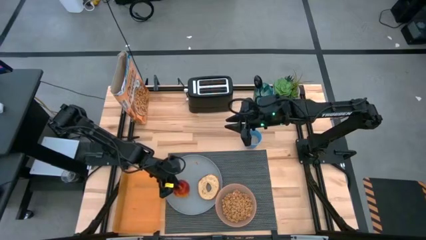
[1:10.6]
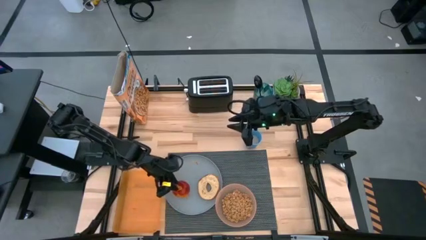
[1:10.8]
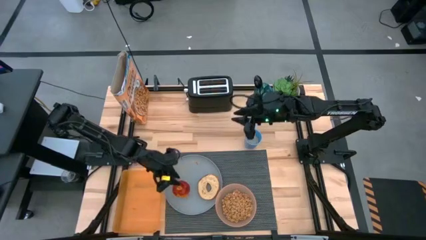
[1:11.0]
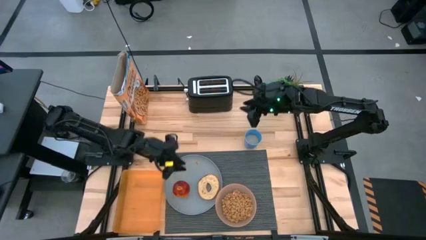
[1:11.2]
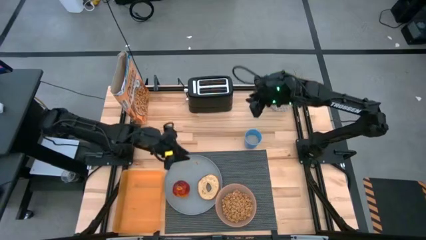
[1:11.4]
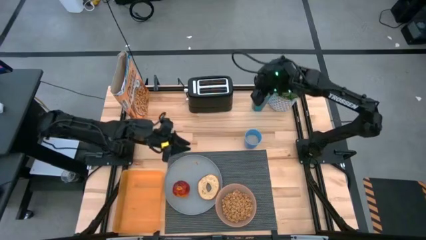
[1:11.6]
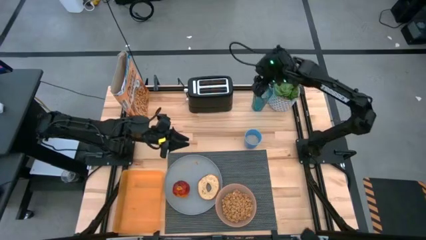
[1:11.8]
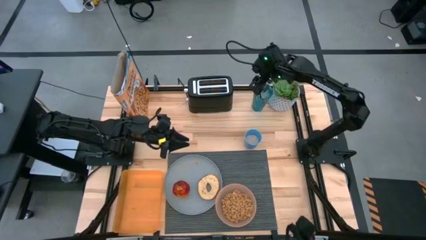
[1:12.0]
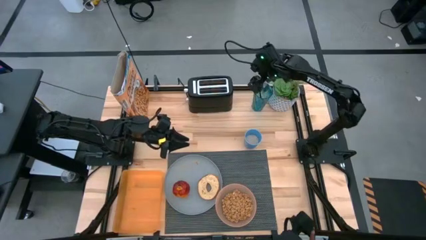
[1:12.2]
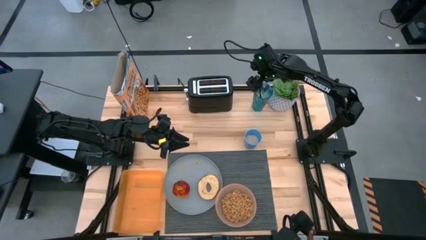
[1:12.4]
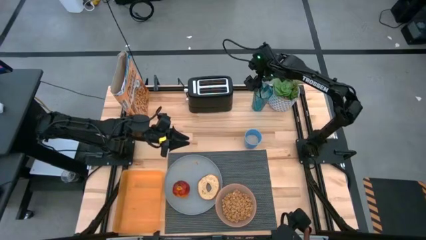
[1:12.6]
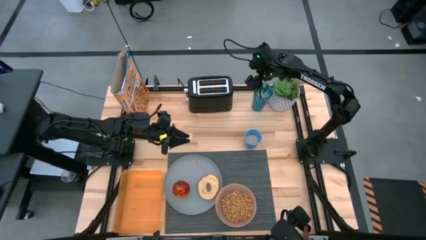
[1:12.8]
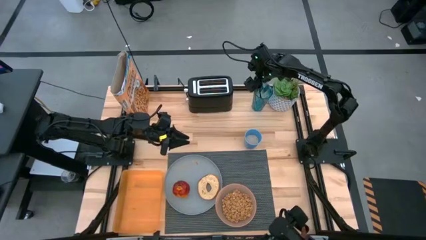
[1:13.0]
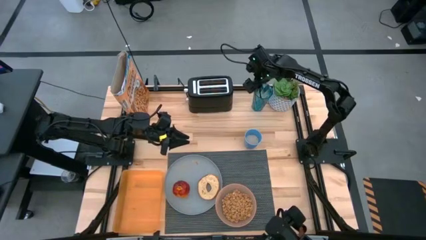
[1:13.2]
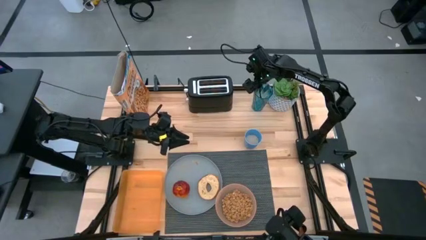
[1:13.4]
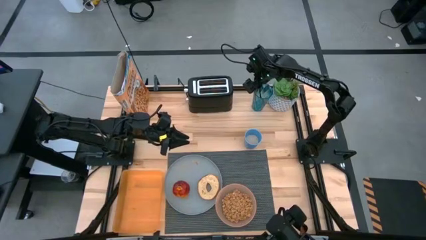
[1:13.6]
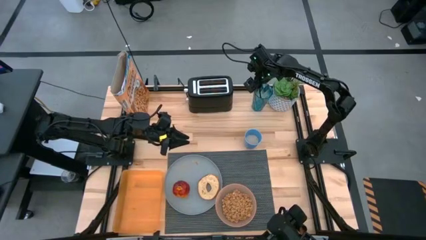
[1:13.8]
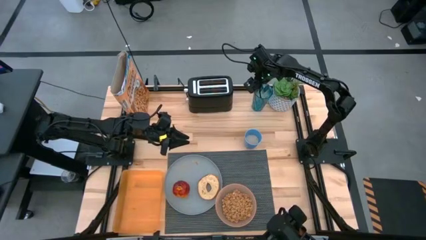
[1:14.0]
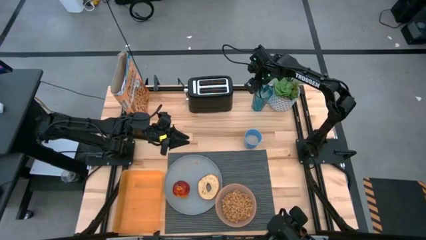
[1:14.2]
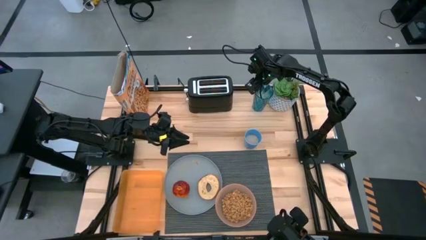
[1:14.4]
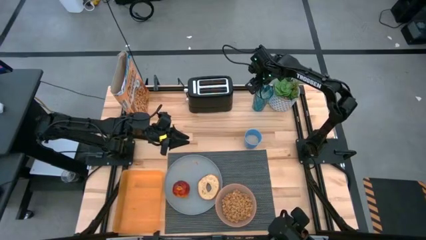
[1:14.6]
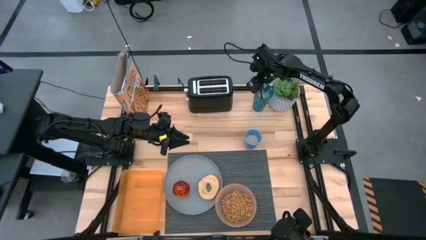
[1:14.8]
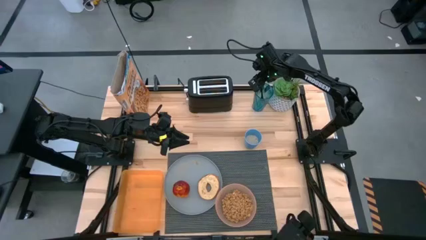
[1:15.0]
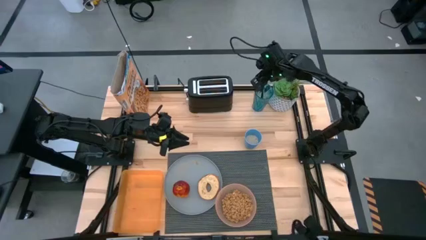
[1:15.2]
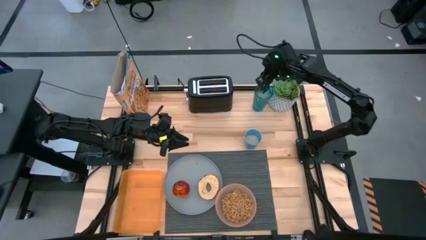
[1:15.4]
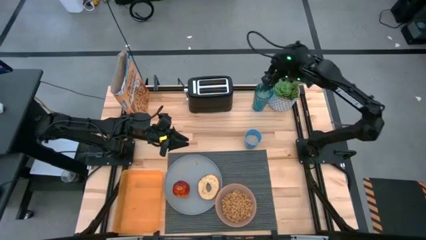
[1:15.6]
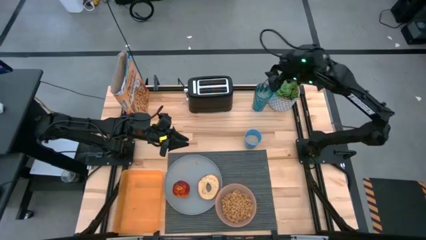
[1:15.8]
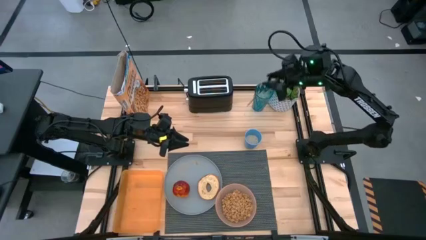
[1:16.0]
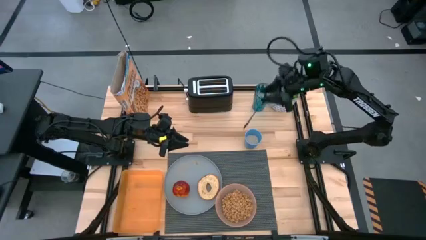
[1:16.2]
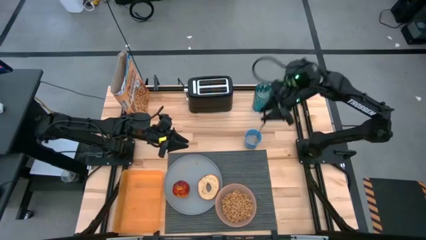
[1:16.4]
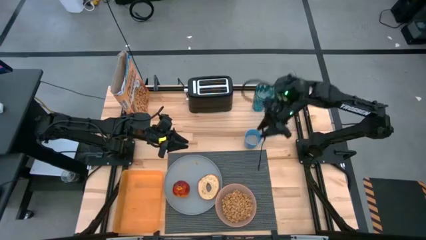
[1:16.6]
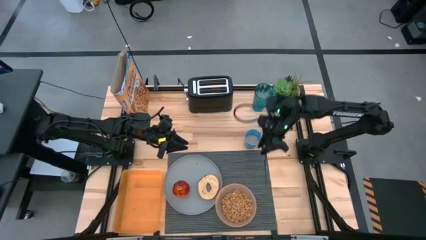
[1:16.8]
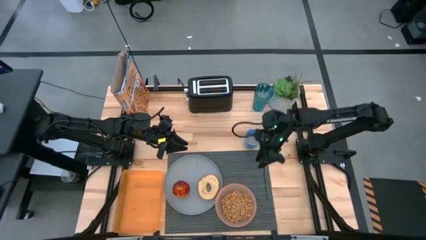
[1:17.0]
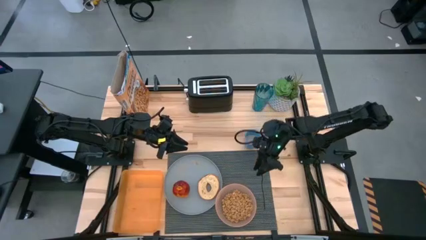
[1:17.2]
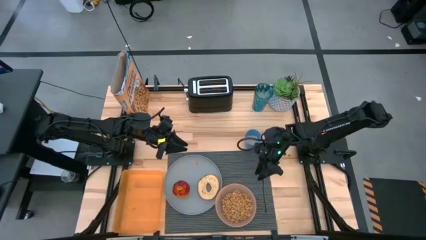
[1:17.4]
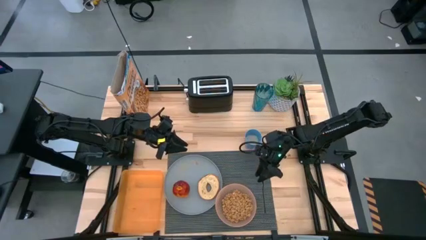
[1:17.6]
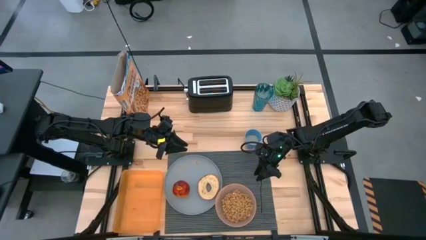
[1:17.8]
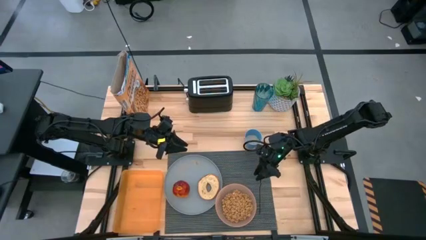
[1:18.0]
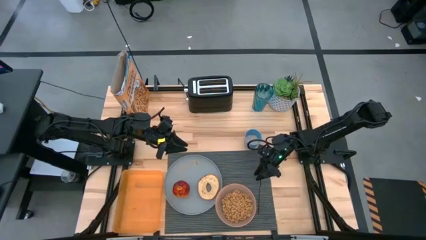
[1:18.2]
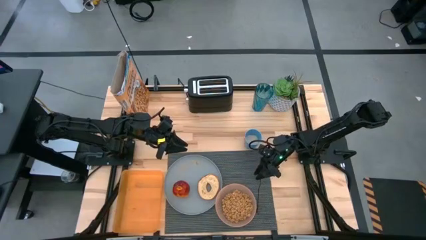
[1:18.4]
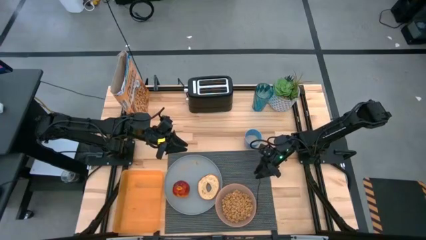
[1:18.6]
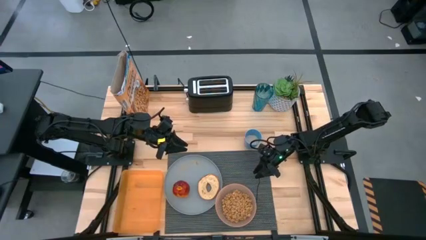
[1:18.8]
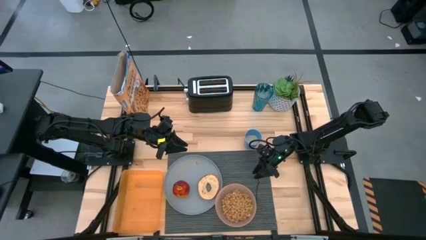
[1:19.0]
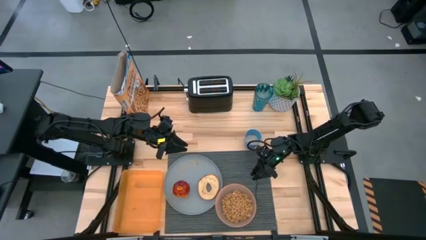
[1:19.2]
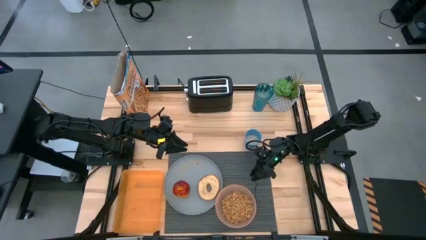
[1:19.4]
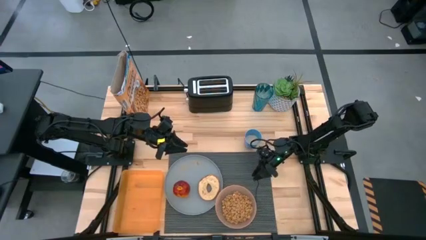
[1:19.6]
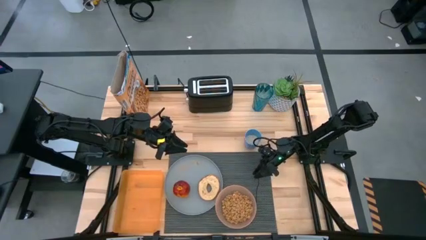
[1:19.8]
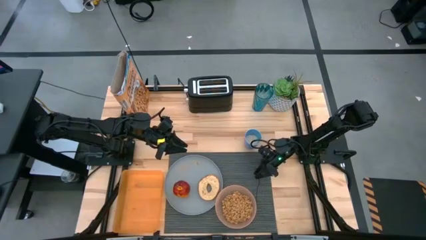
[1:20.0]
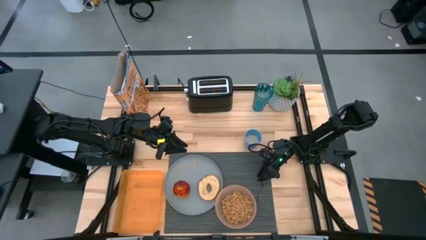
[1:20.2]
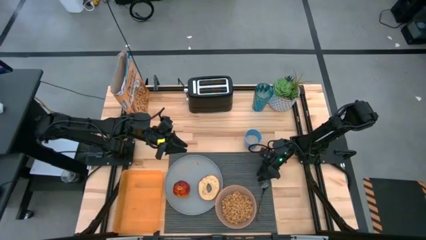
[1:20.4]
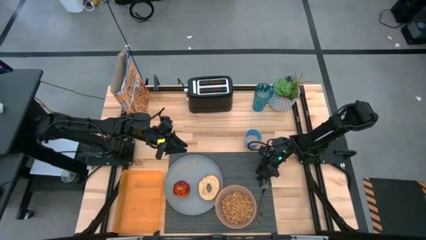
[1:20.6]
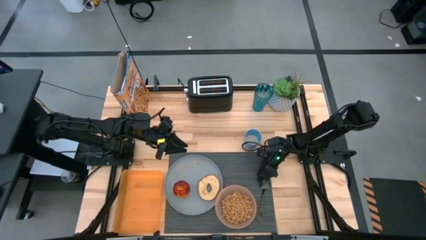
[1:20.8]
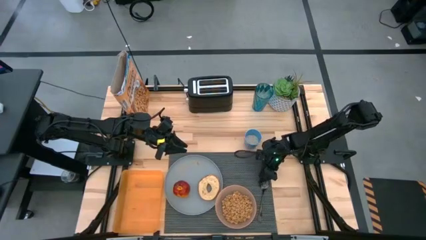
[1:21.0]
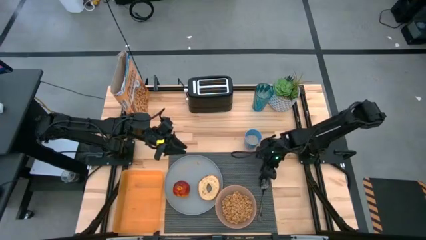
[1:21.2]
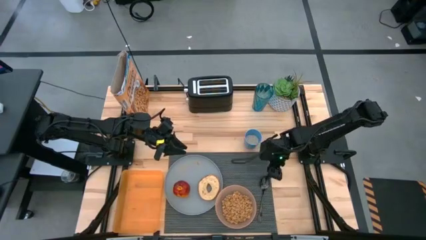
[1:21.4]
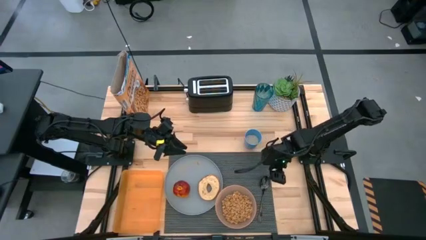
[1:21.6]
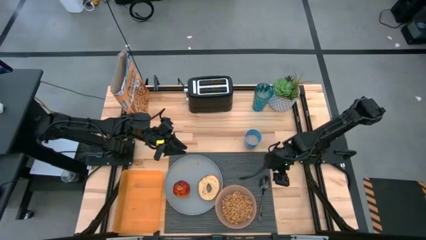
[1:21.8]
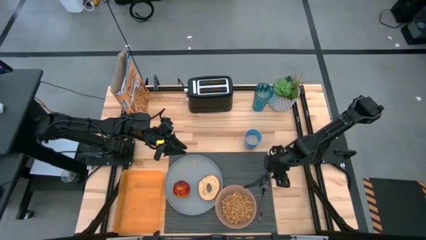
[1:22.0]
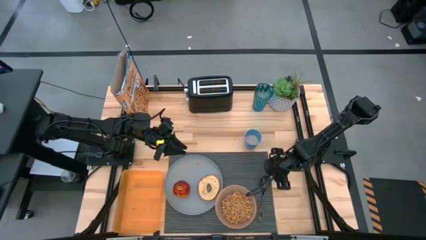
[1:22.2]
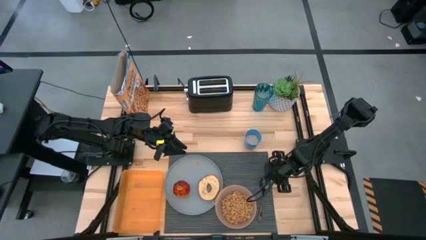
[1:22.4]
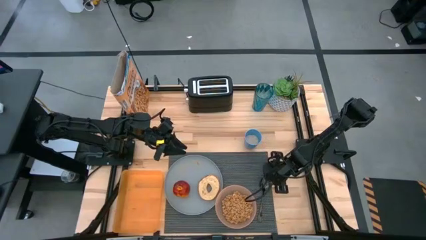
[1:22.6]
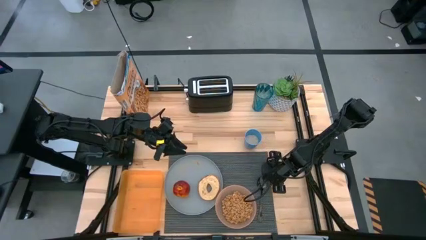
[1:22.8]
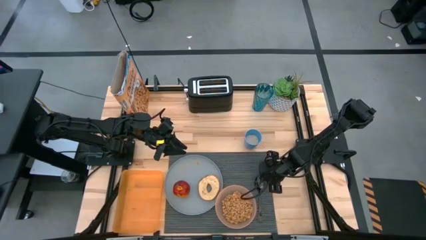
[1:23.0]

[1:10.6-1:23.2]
Task: Arrange a breakfast setting
Put the spoon on the black mat

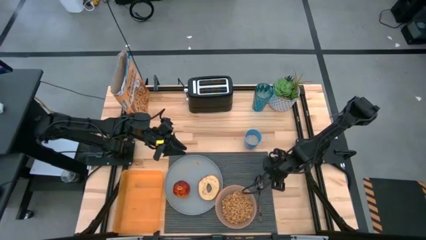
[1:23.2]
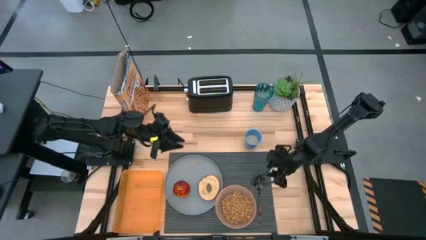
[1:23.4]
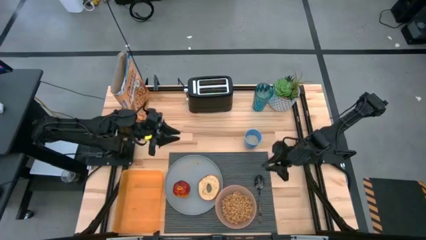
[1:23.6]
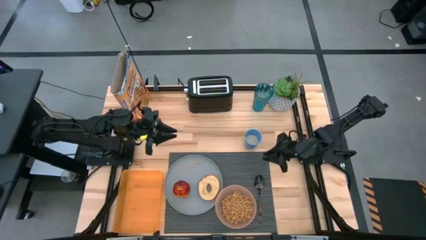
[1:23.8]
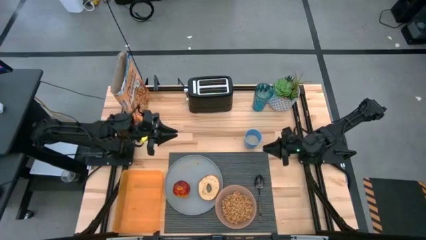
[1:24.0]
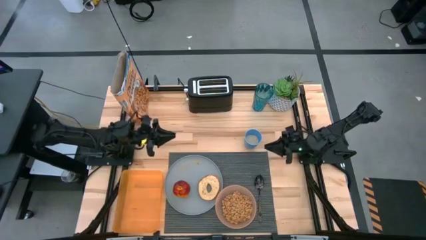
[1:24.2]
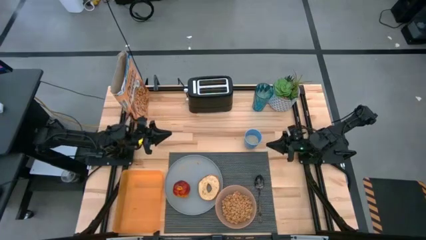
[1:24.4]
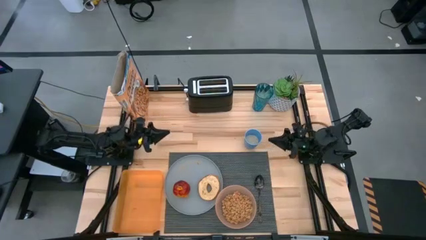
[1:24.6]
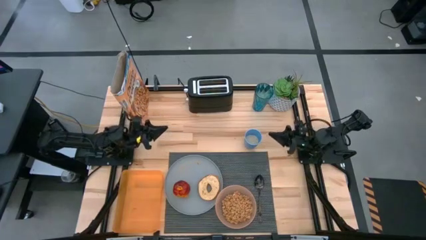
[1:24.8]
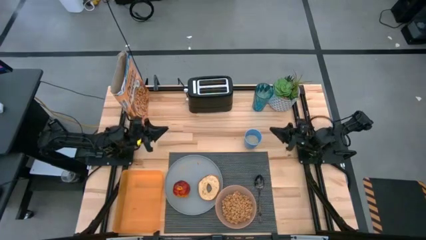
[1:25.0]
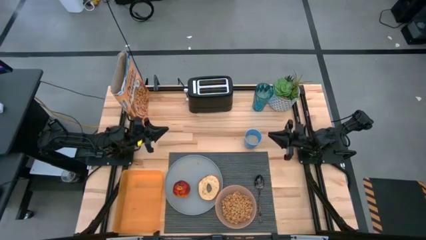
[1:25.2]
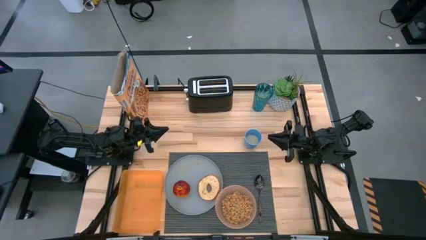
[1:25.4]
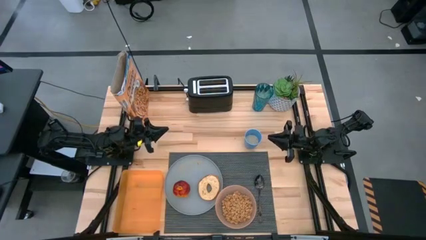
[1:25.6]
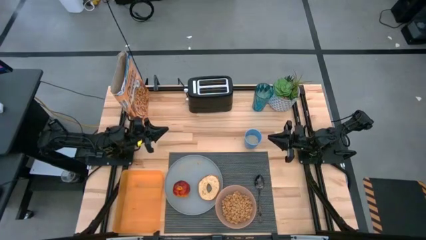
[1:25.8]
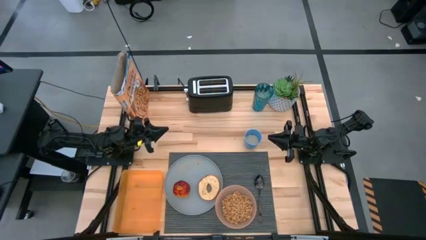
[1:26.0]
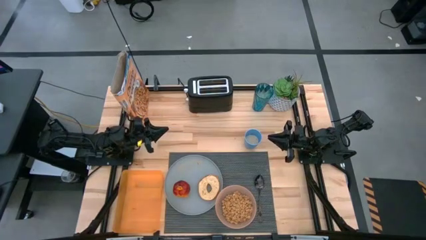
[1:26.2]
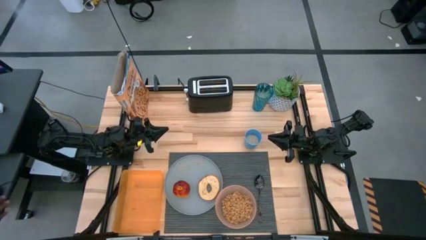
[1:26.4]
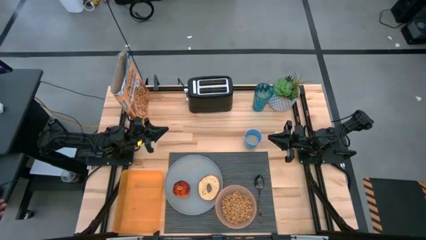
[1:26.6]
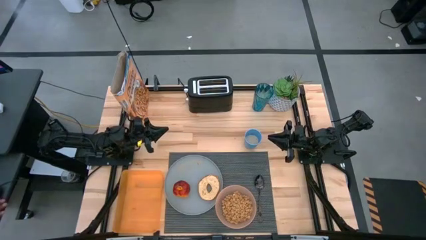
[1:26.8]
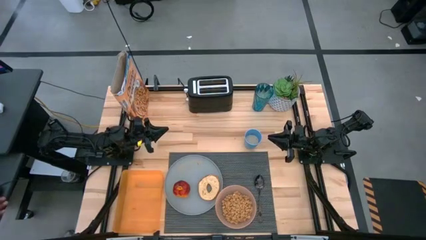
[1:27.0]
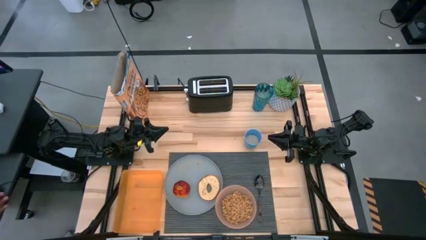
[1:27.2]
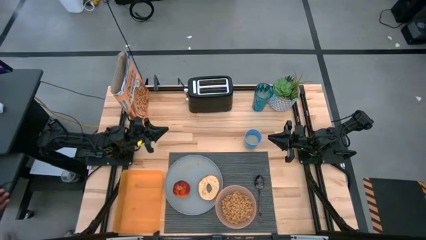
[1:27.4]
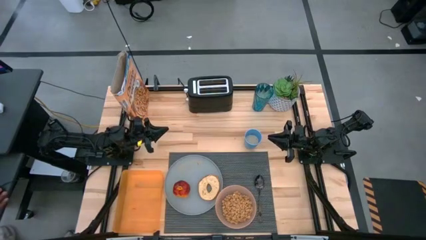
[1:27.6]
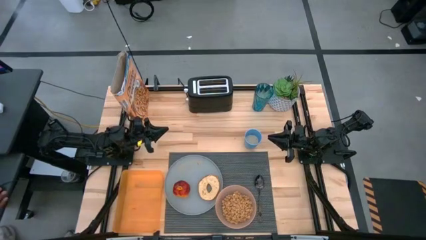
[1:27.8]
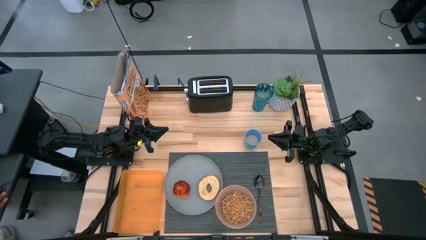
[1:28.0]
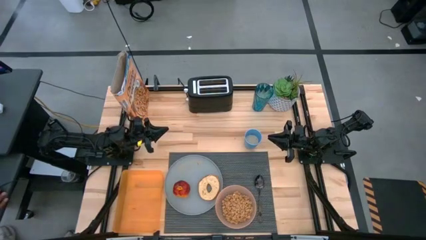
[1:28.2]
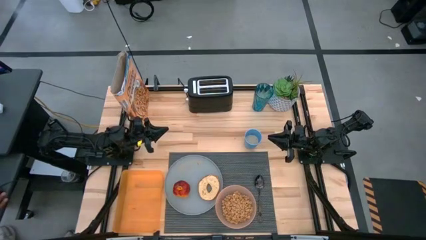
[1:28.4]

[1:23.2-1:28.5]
Return to Home Position
